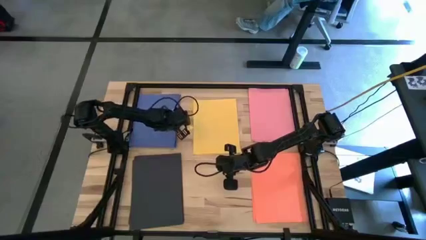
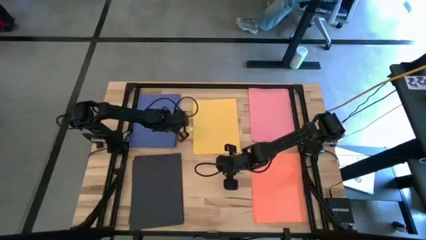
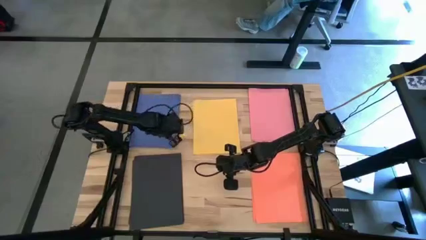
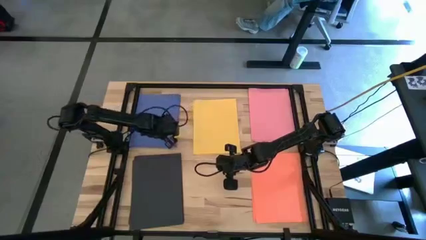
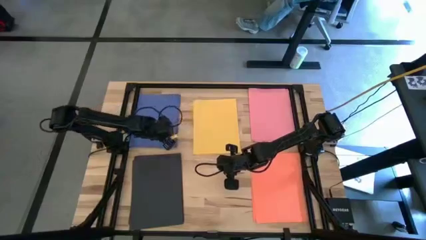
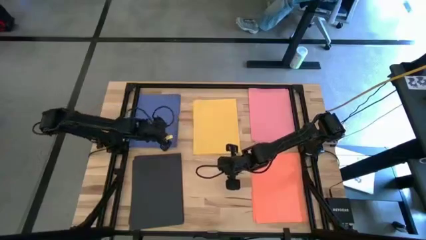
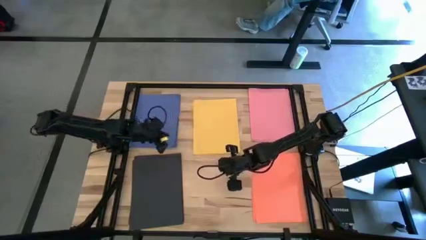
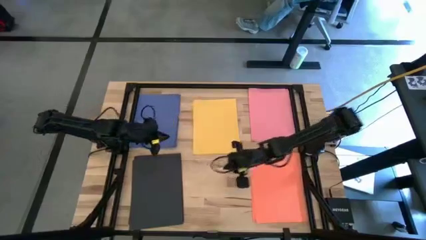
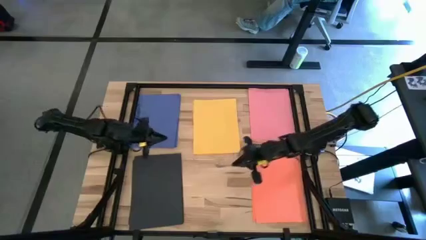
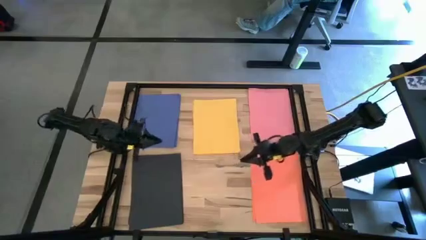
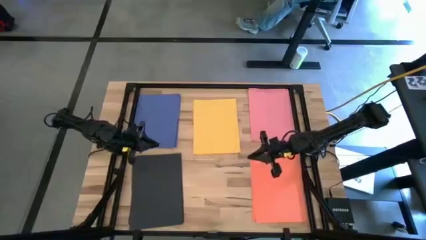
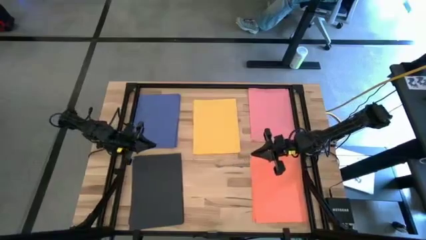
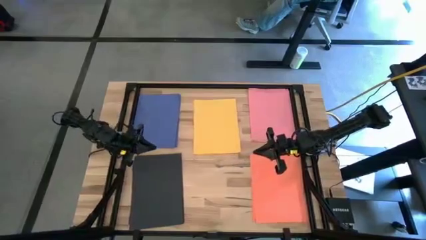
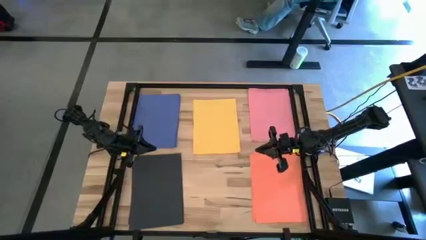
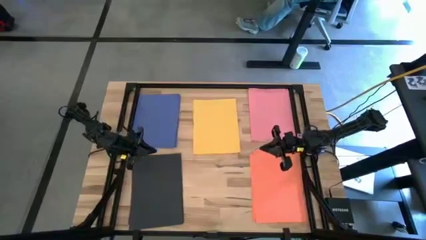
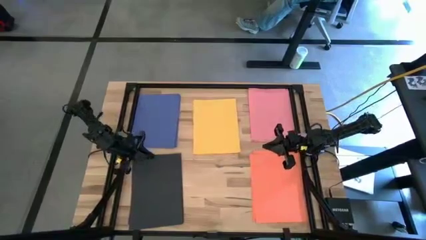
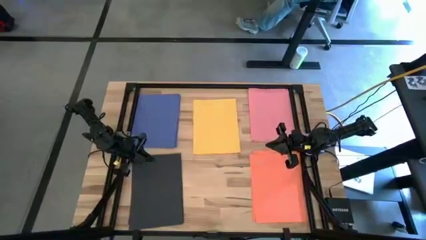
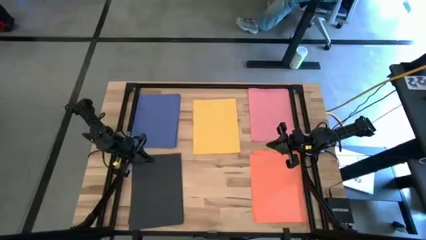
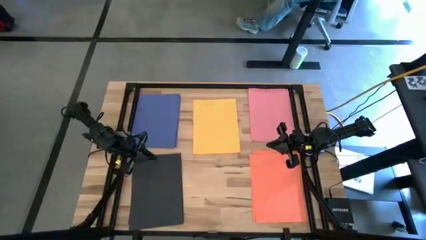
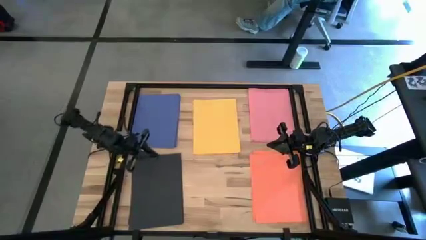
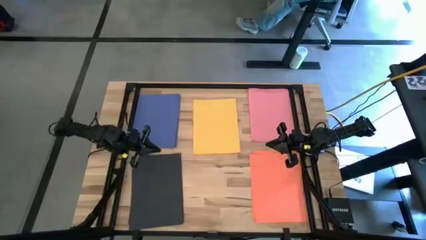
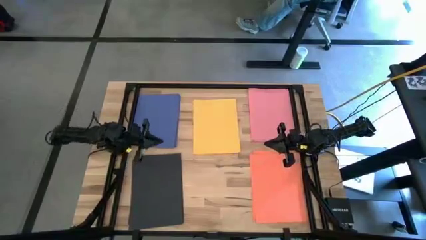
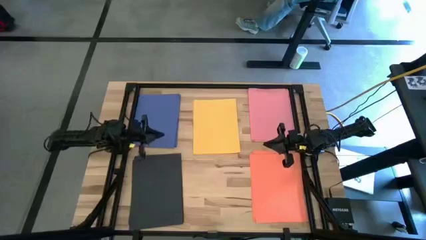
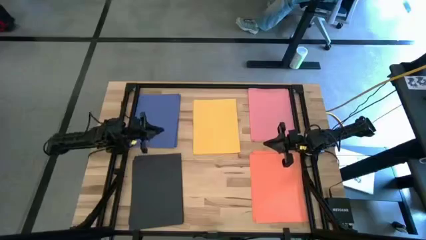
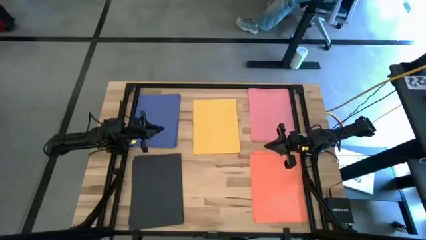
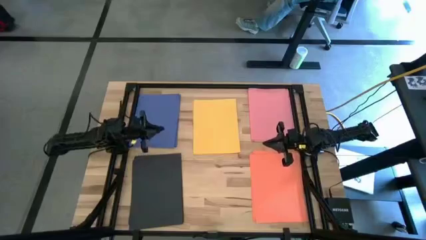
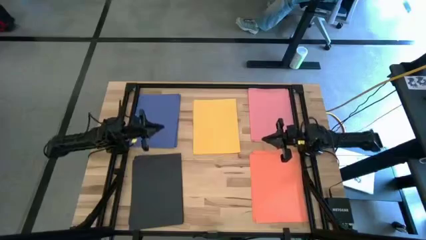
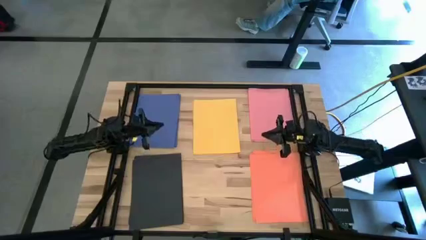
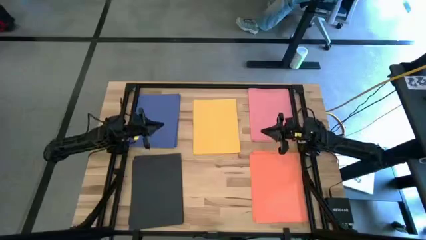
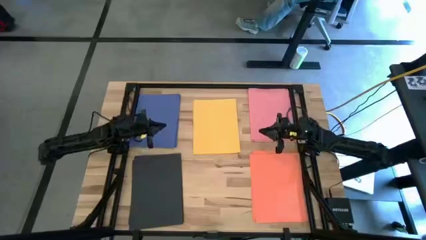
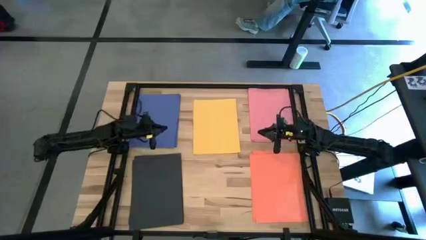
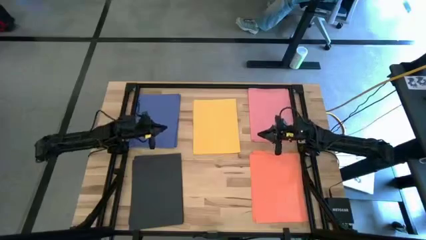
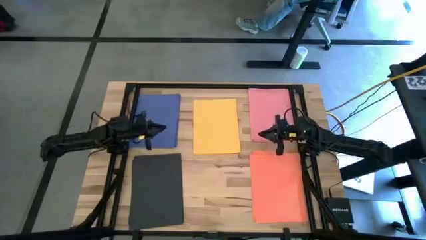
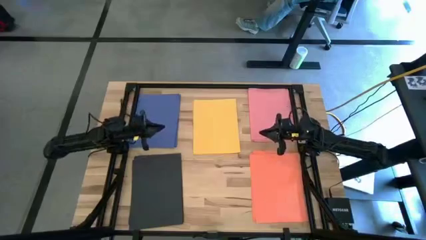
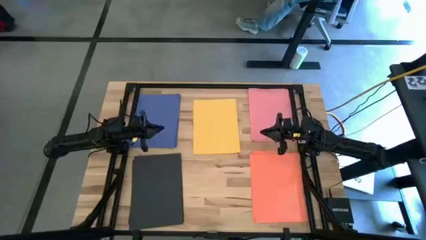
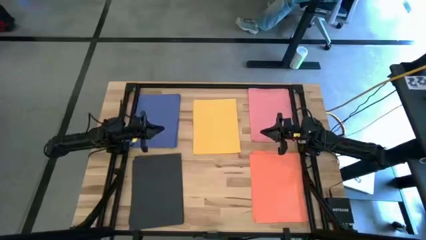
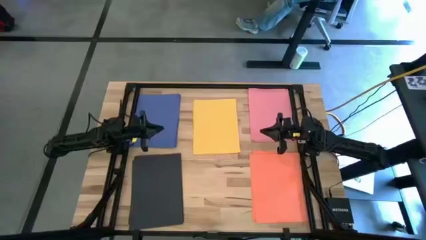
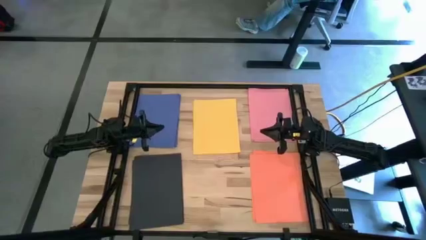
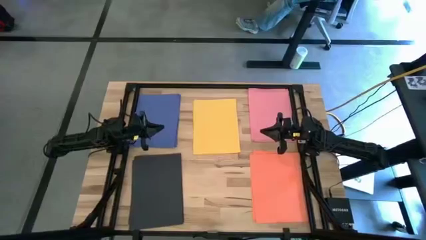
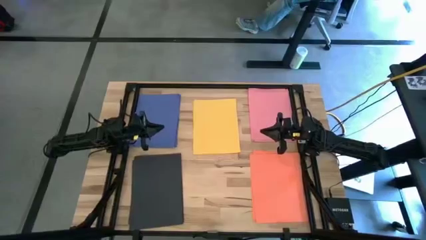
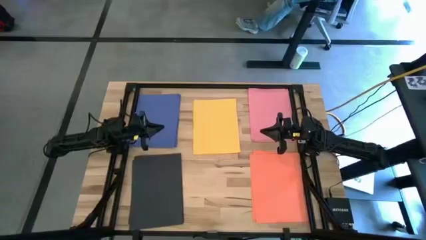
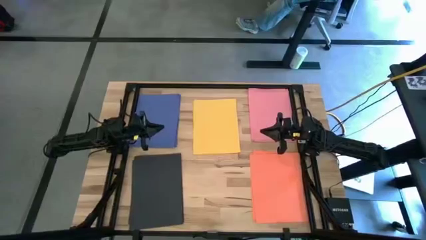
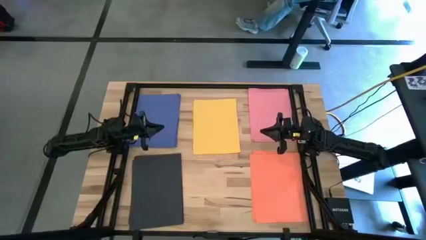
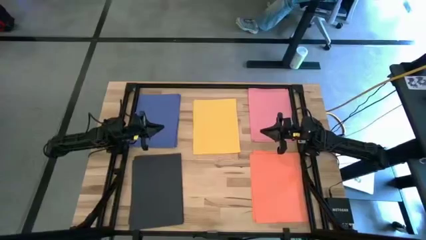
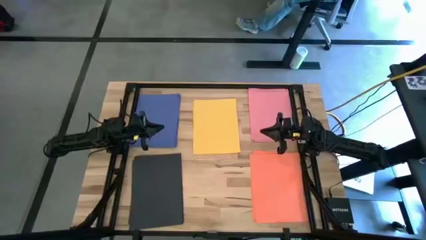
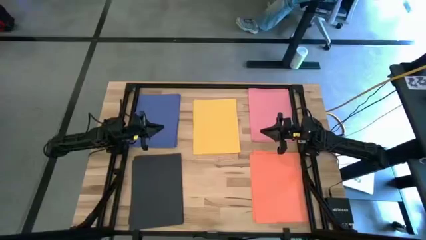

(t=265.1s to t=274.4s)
Task: Organize paper
Return to Home Position

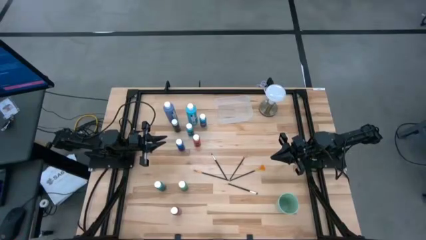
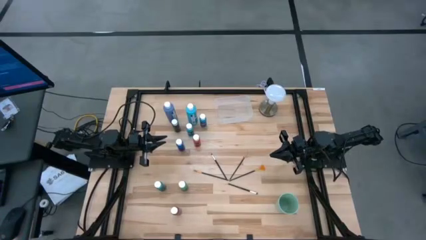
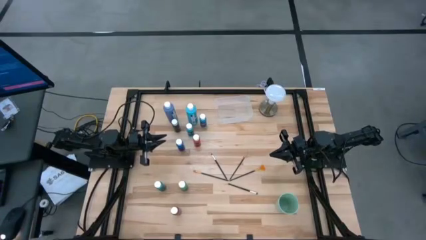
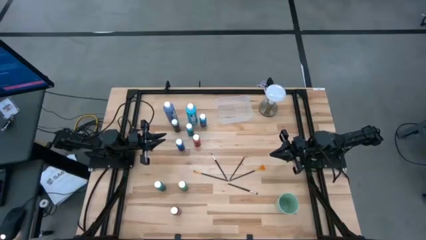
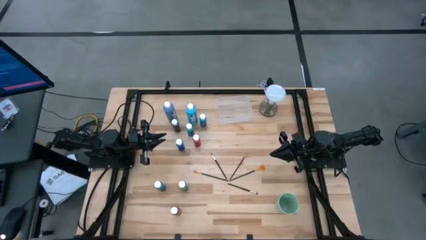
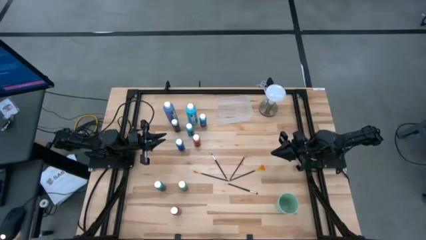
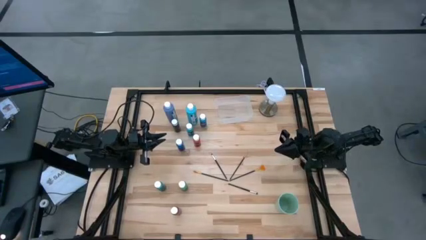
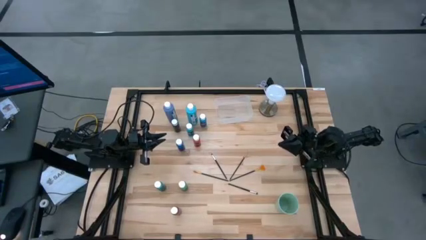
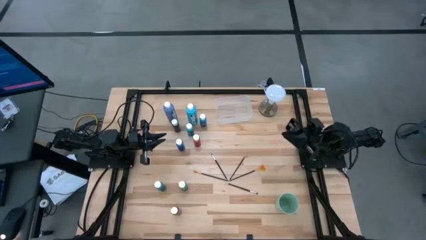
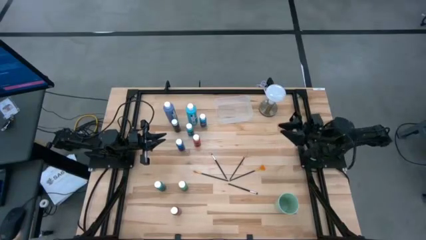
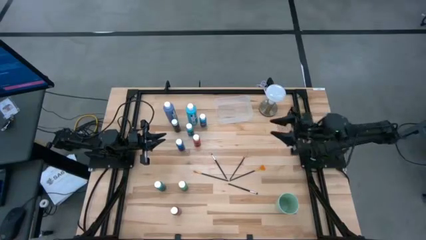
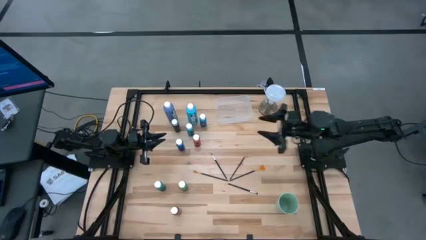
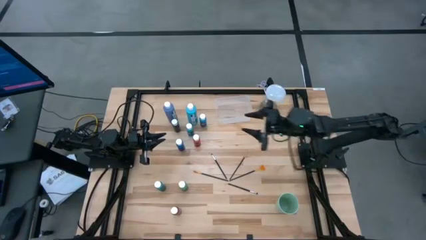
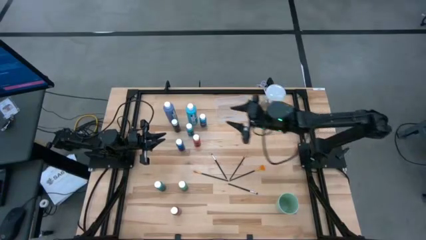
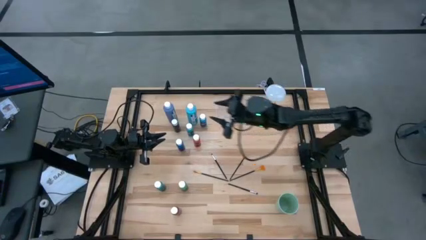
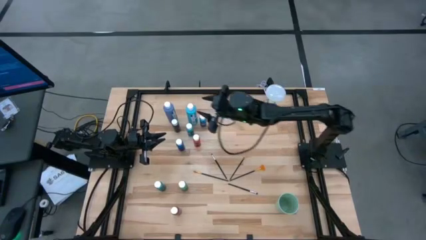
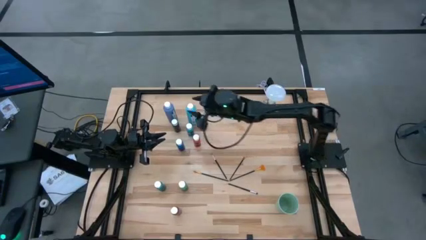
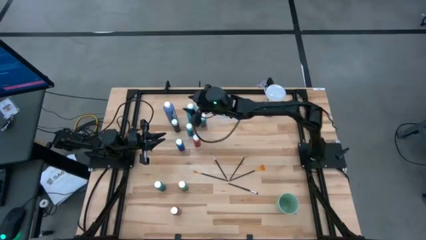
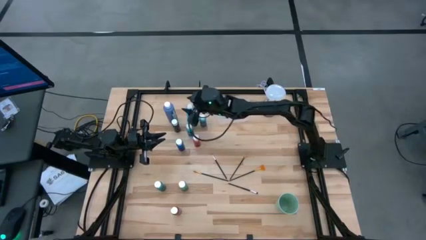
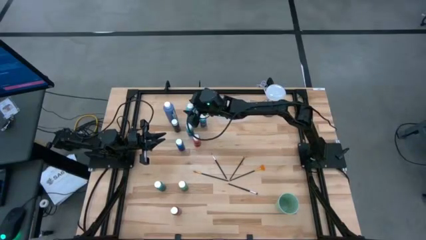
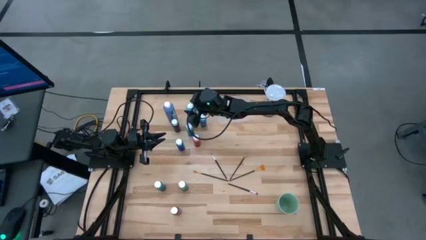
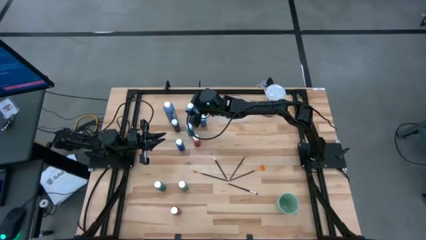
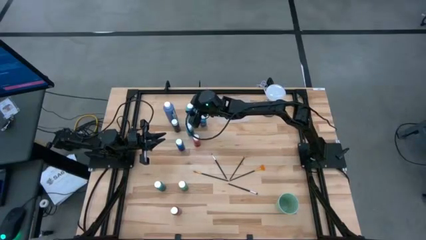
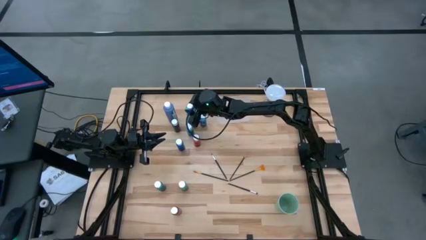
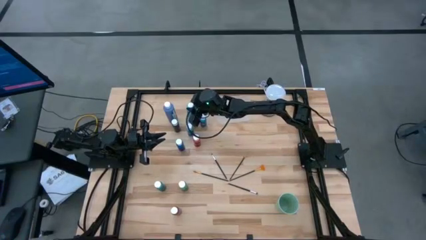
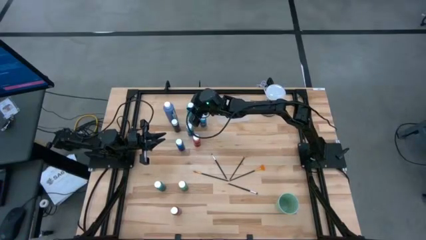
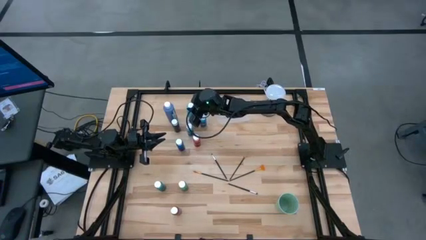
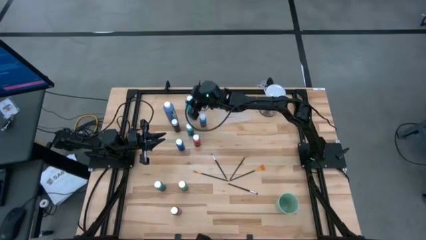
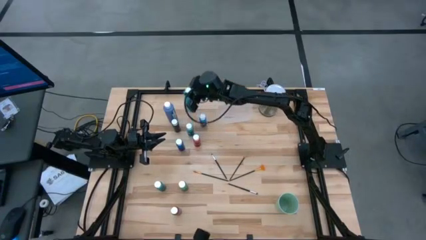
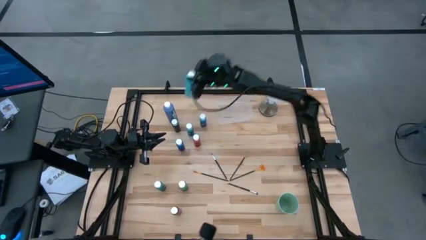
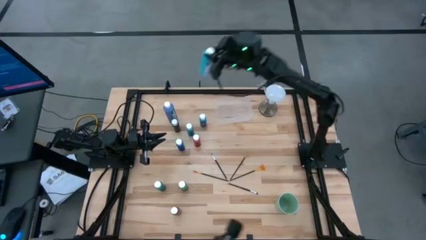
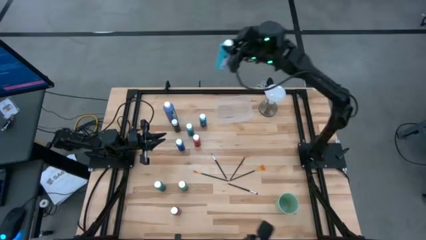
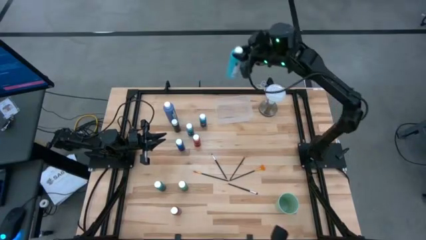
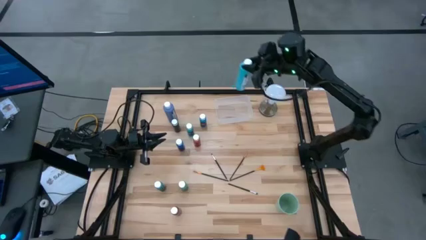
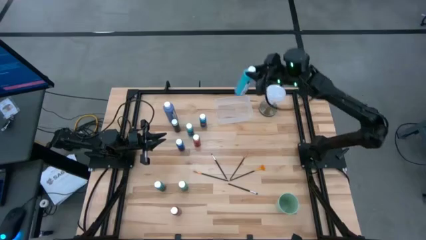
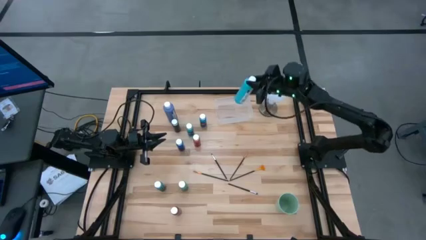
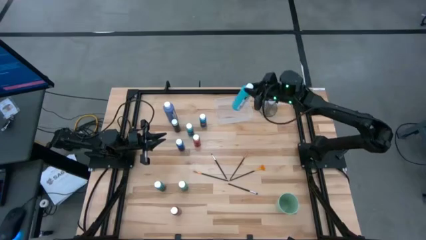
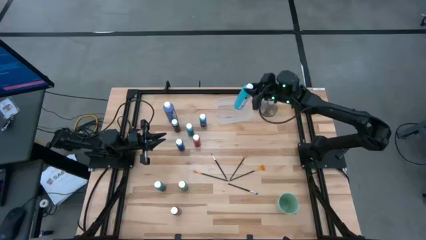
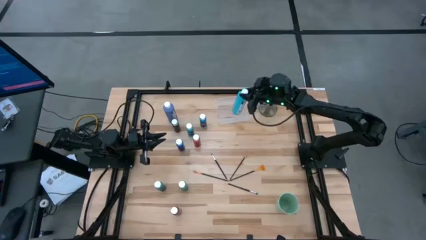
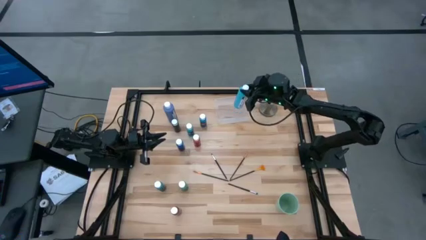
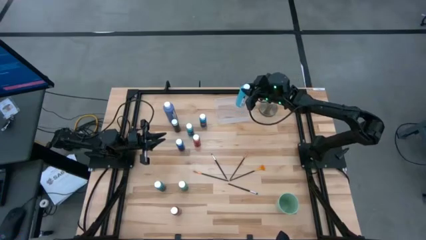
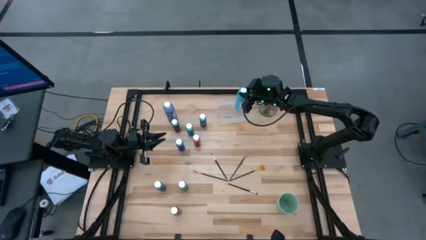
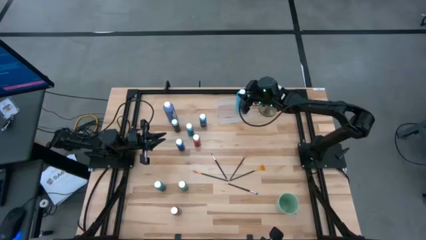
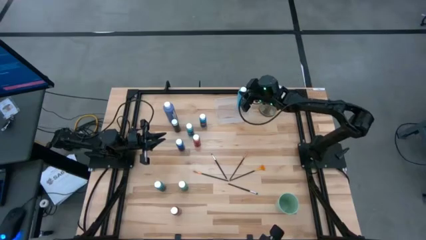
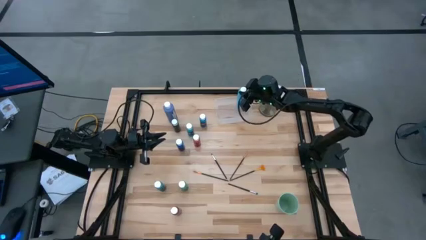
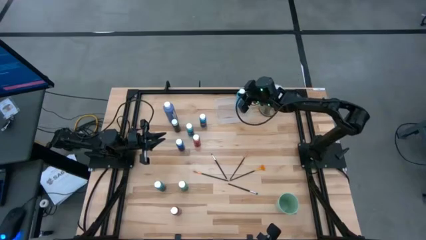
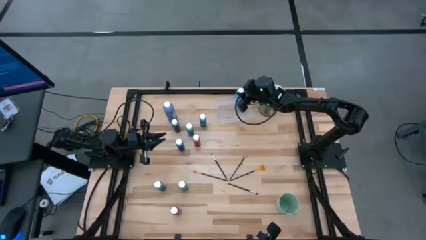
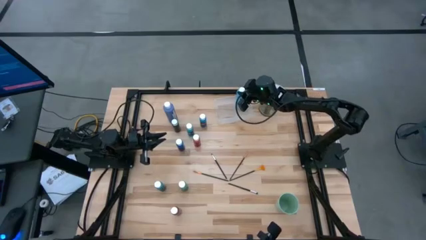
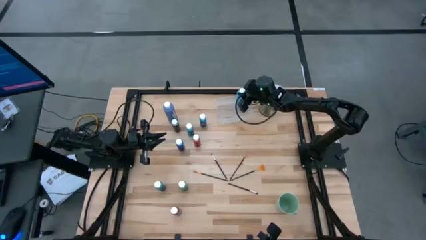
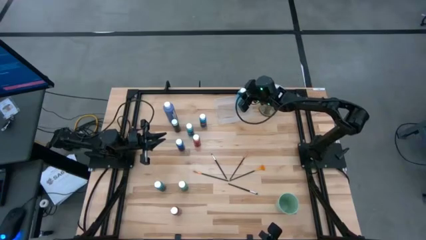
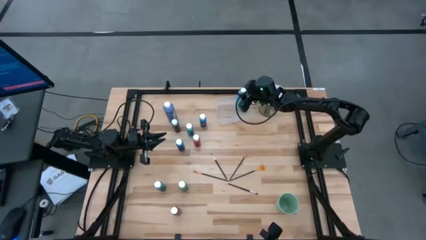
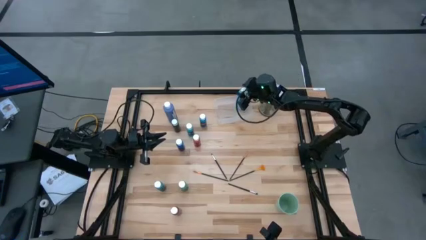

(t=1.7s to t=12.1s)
Task: Pick & Place Paint Supplies
Put the large light blue paint bottle into the transparent bin
